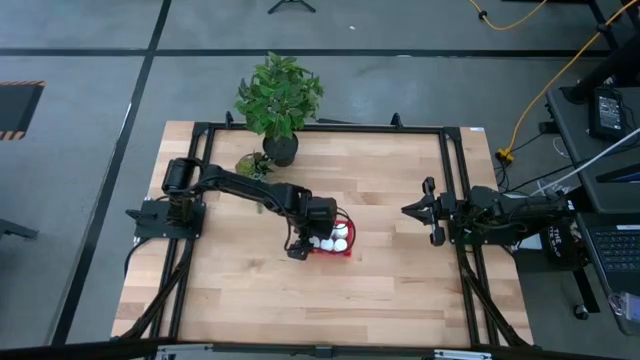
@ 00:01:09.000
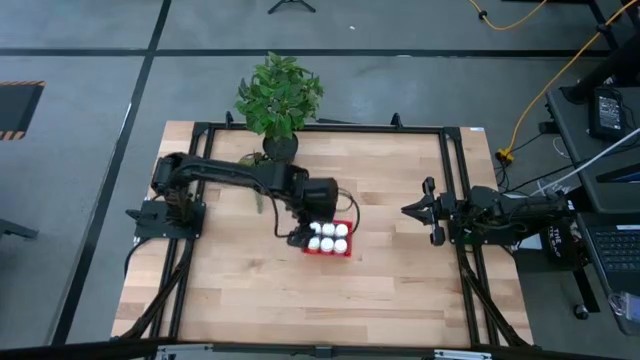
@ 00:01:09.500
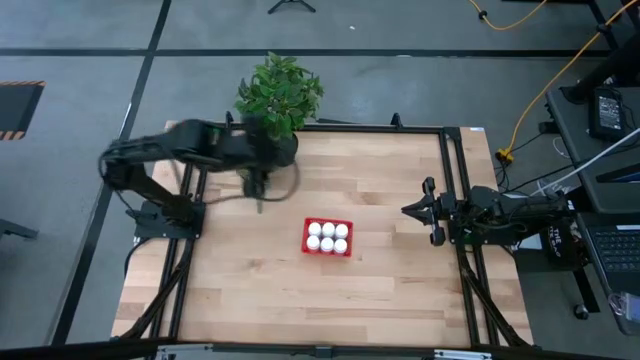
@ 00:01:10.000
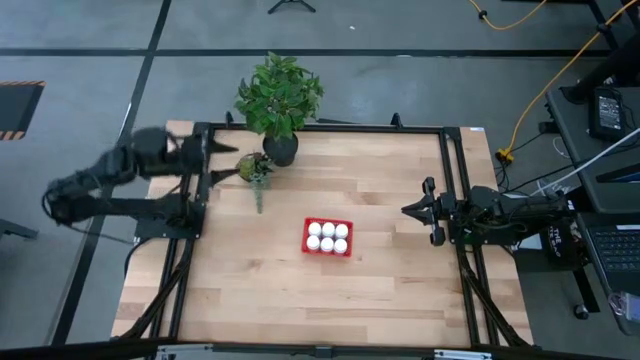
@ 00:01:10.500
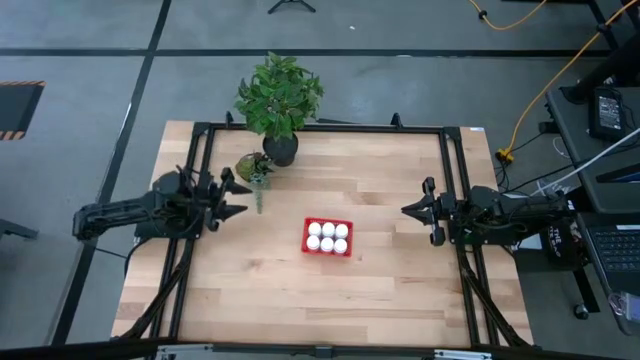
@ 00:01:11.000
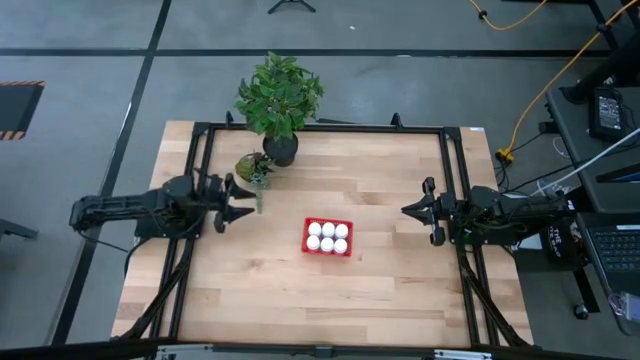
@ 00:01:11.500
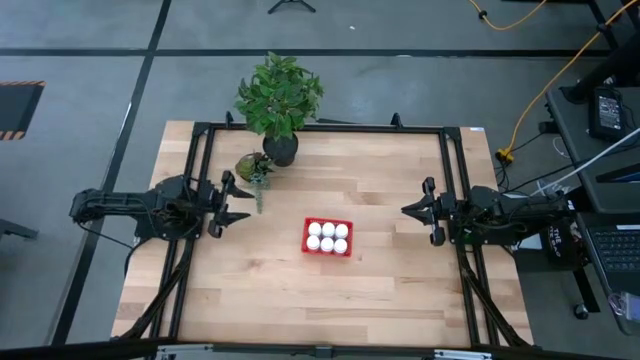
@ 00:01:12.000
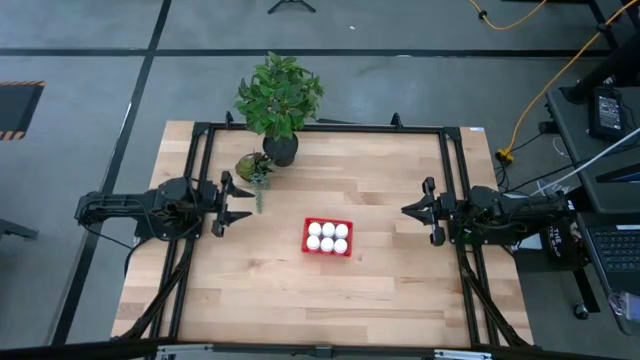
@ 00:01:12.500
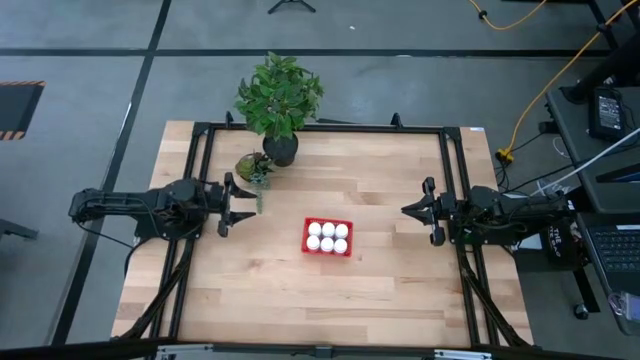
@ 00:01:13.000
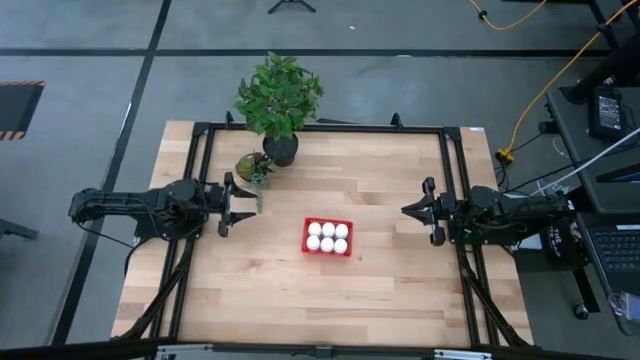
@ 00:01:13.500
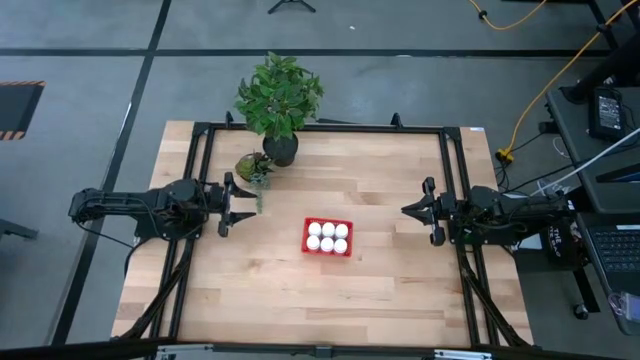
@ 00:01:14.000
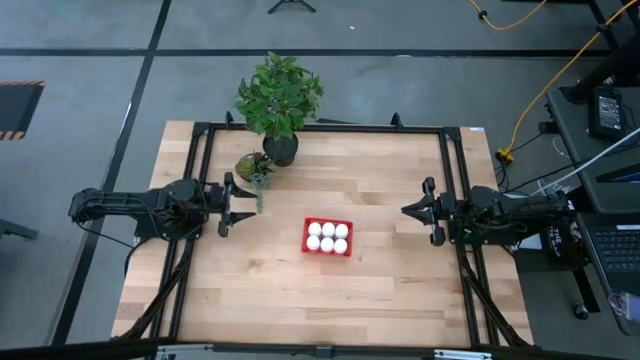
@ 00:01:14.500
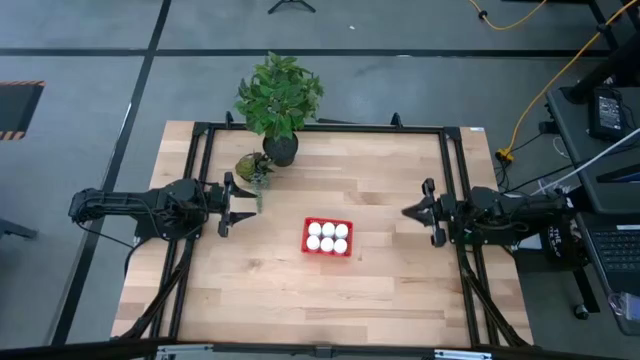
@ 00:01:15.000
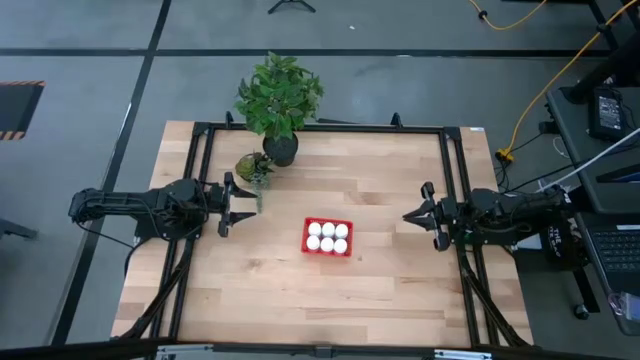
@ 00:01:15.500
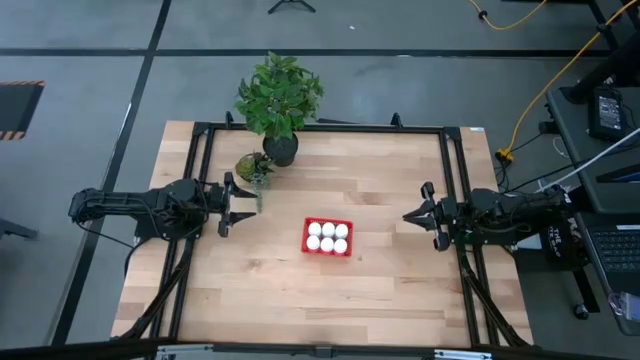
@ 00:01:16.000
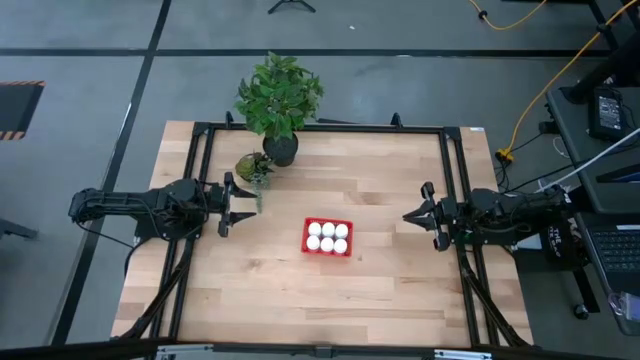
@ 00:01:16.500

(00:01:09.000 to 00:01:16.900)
Task: Pick and place pill bottles into a basket
Return to Home Position
